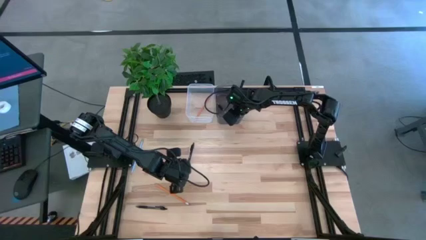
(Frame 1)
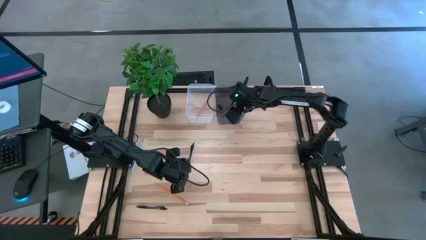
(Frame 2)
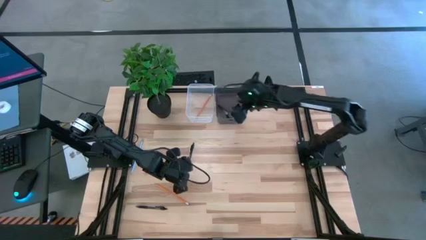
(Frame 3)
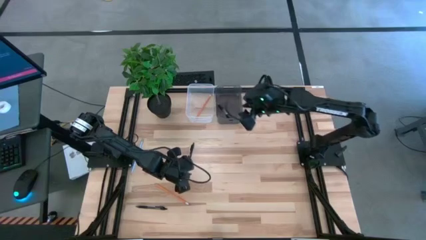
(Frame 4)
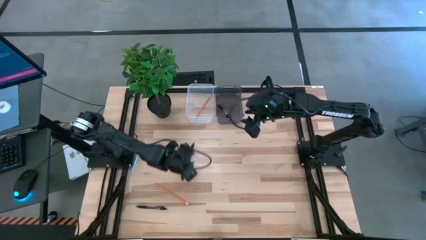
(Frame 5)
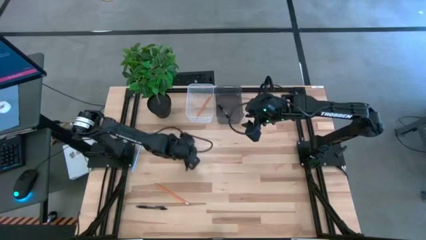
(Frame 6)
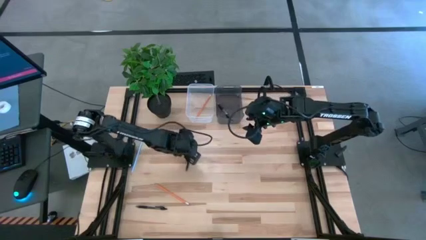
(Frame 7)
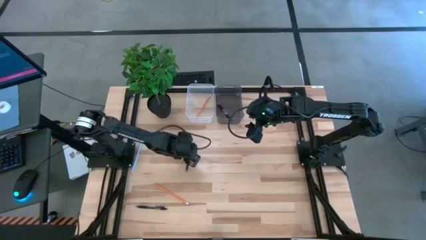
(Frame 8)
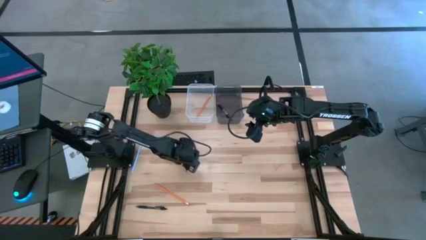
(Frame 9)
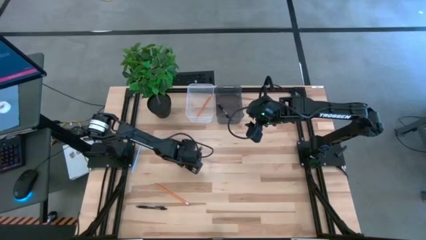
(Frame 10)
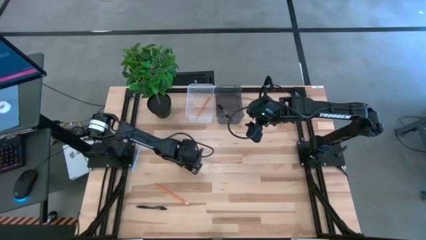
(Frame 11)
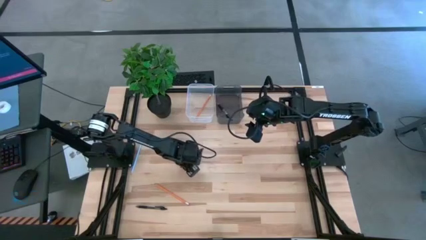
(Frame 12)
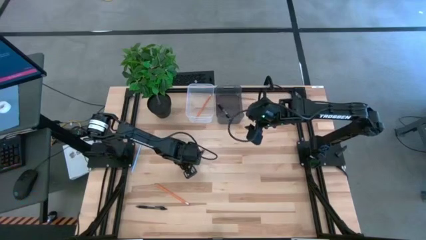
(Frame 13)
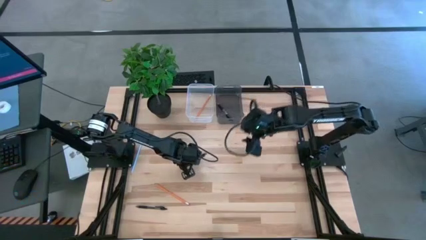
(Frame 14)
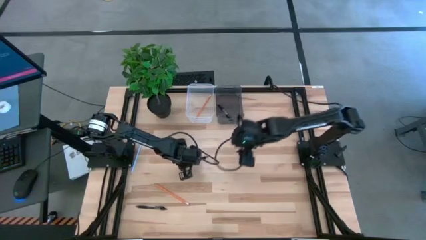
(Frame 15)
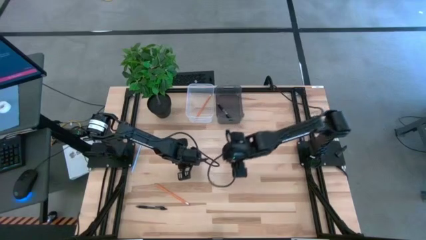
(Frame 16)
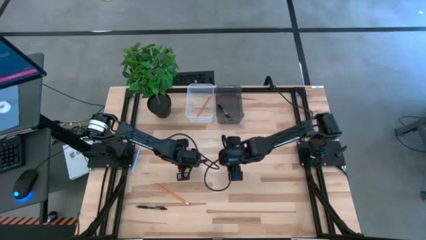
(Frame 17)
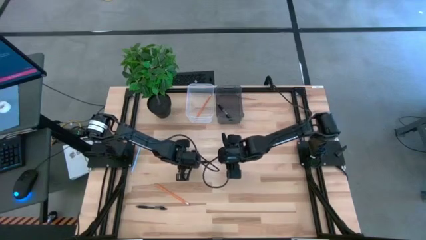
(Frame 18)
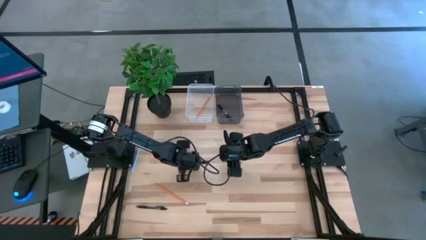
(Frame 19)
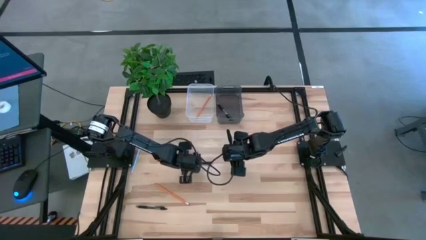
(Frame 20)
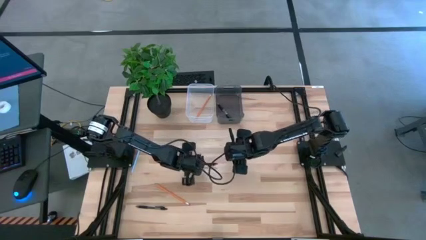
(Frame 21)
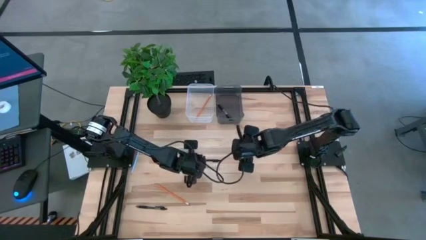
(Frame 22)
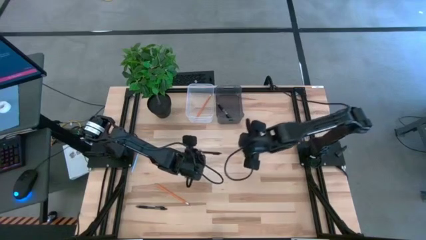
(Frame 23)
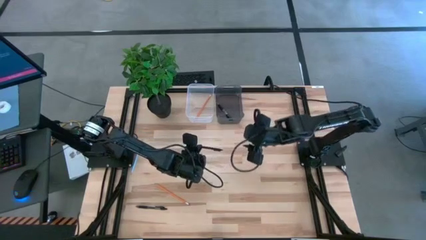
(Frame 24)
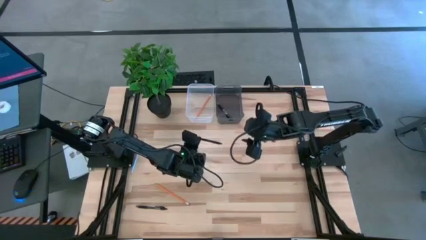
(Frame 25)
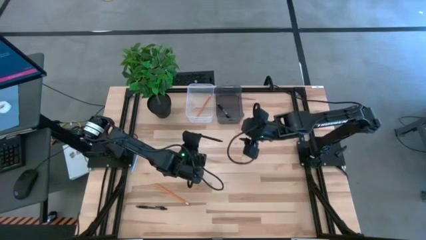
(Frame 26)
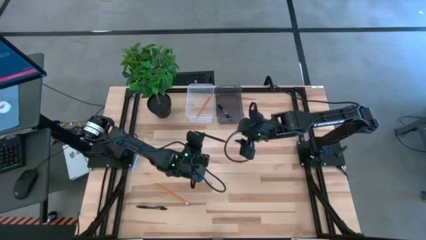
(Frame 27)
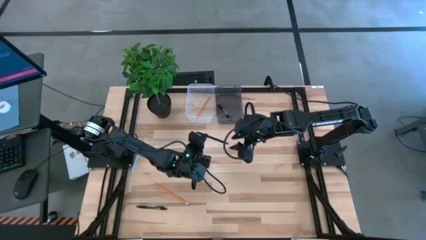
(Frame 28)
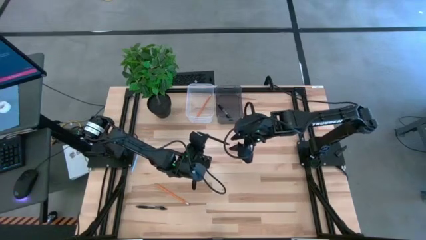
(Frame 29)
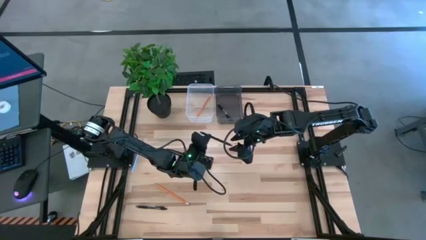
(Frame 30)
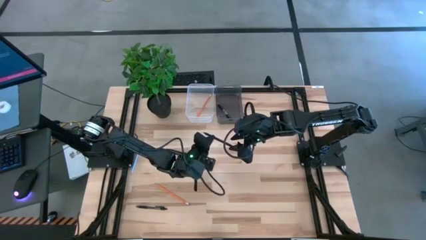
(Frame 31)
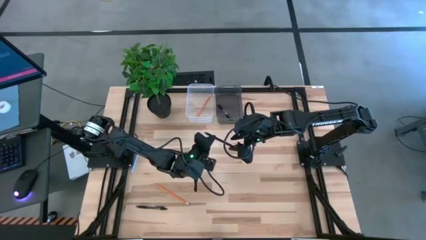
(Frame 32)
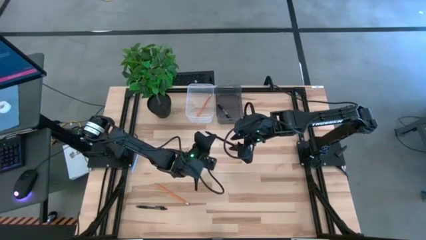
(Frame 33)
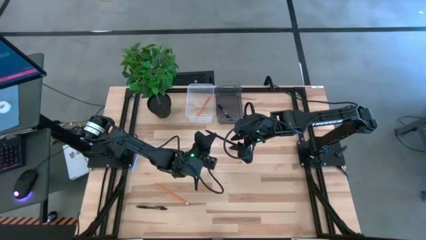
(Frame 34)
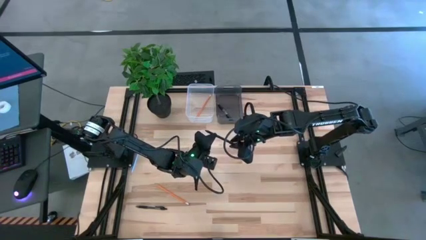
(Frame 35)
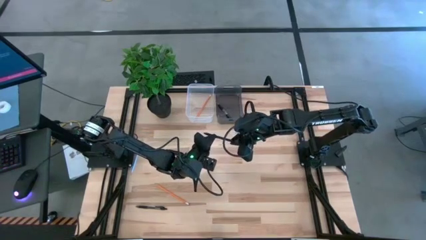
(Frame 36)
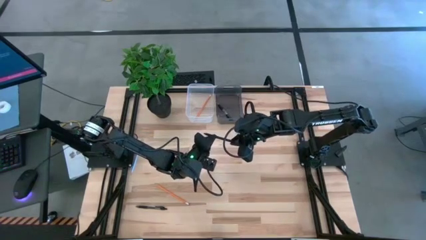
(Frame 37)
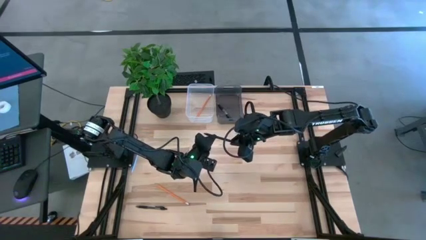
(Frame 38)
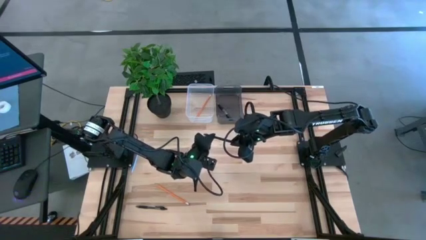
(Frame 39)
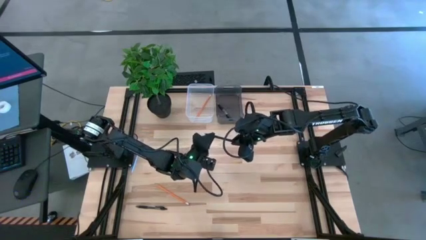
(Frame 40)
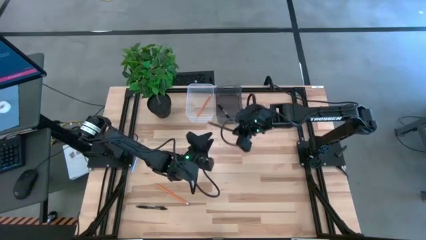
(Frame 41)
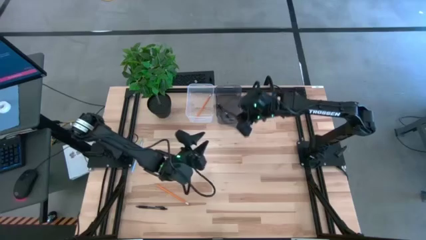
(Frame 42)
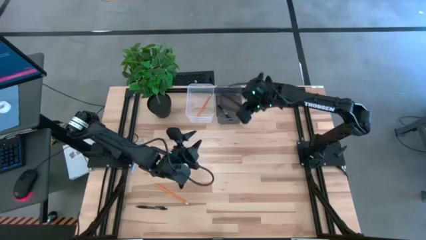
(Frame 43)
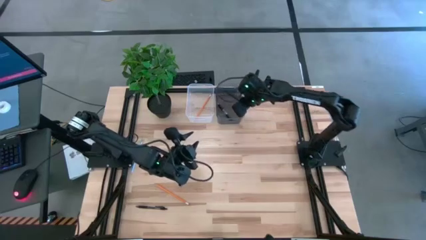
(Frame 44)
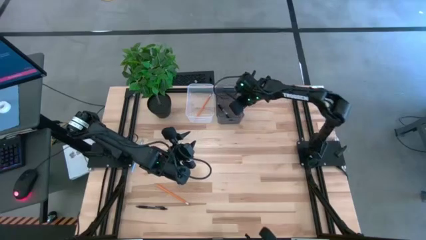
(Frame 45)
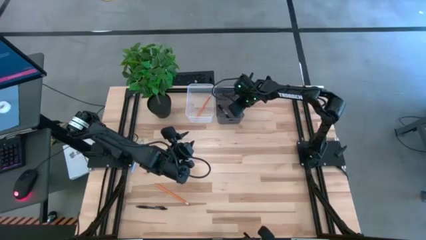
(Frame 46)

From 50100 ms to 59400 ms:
Task: Sort pens & pencils
Put the top black pen into the black bin

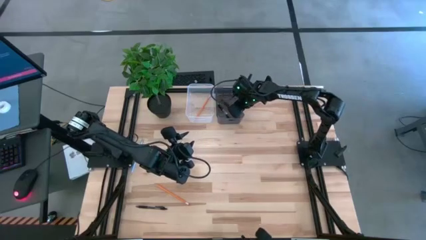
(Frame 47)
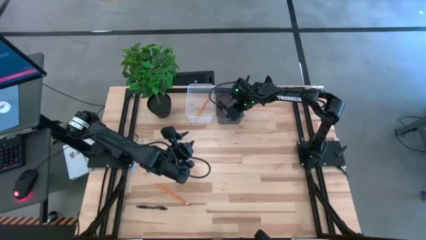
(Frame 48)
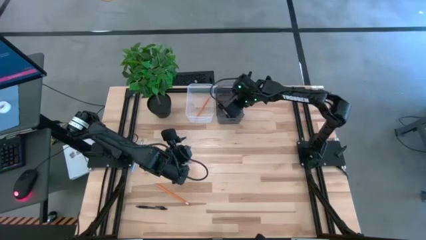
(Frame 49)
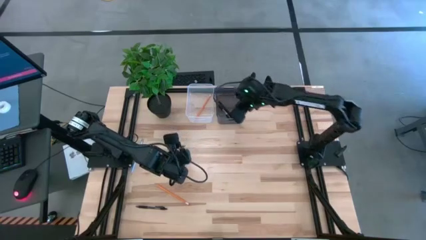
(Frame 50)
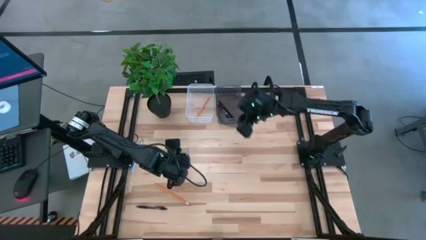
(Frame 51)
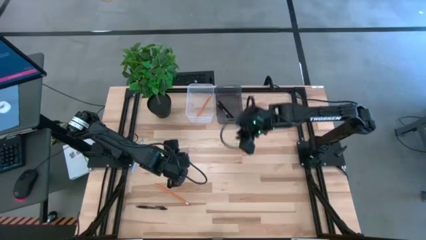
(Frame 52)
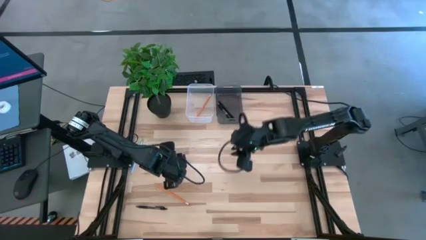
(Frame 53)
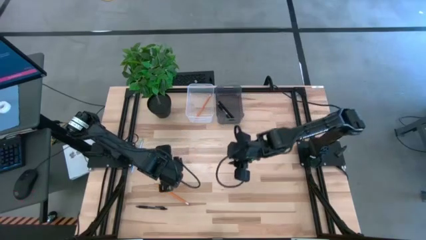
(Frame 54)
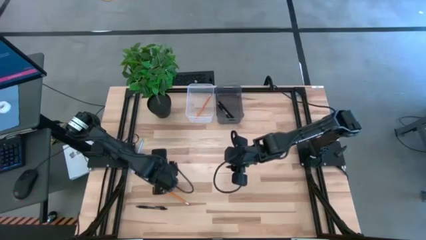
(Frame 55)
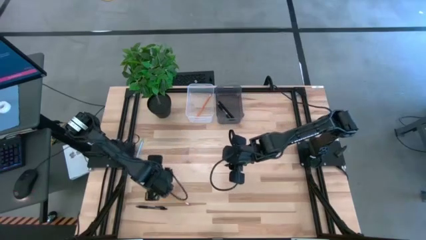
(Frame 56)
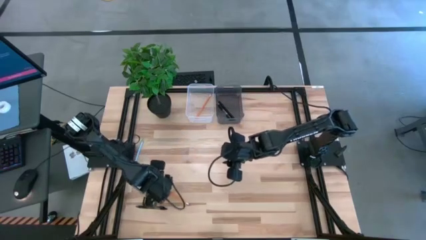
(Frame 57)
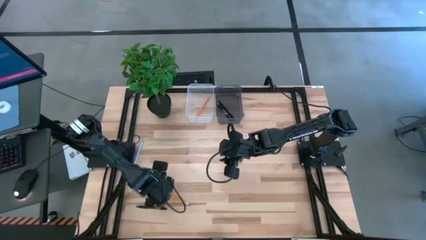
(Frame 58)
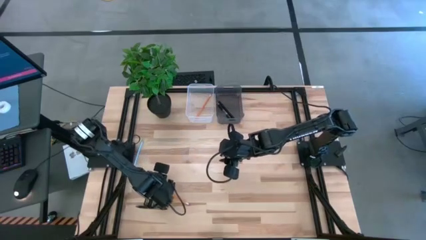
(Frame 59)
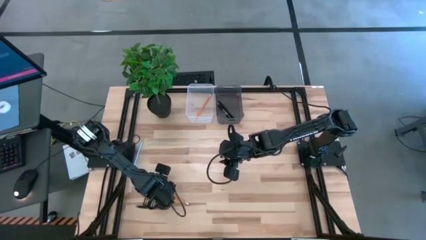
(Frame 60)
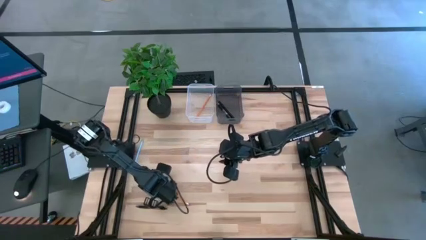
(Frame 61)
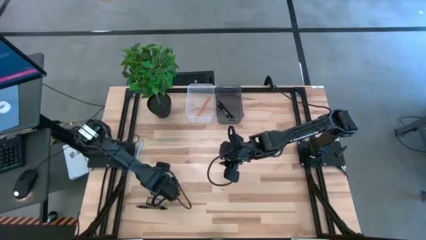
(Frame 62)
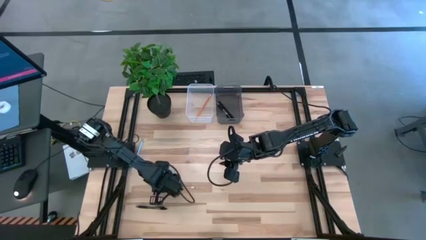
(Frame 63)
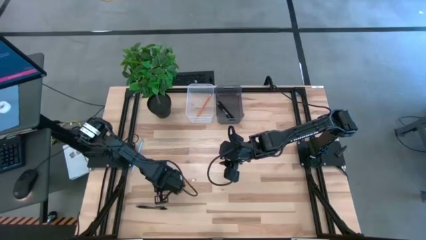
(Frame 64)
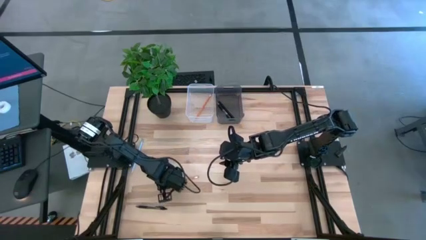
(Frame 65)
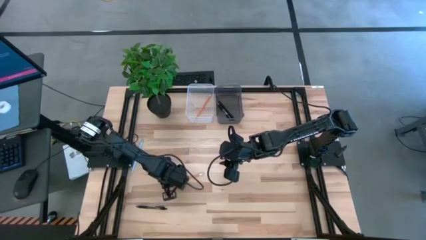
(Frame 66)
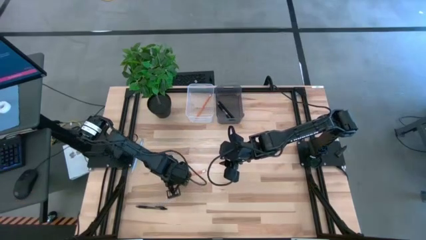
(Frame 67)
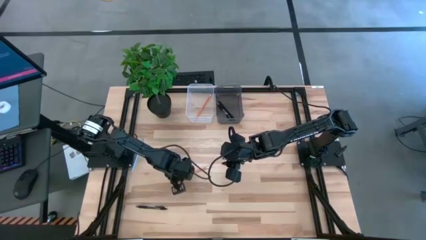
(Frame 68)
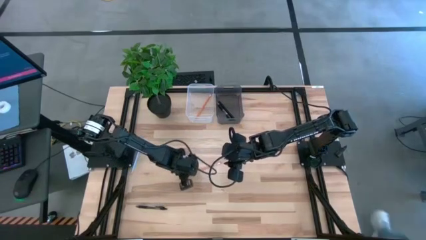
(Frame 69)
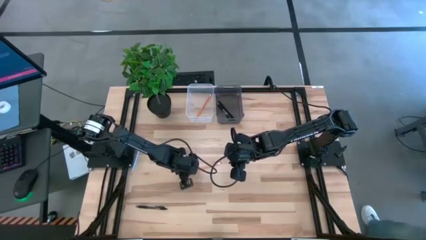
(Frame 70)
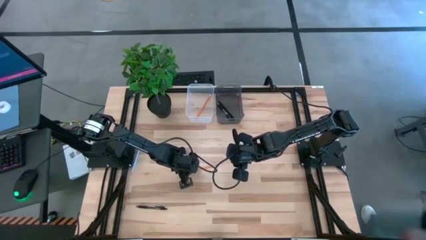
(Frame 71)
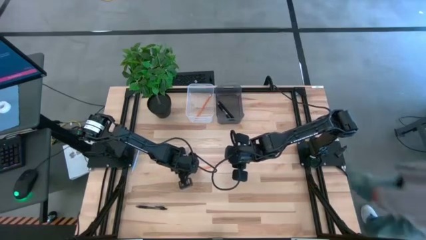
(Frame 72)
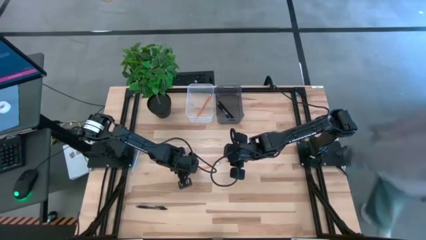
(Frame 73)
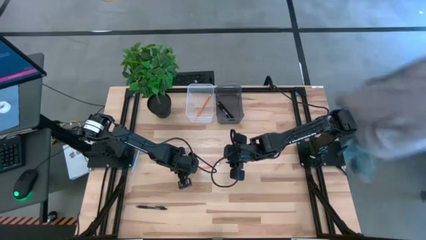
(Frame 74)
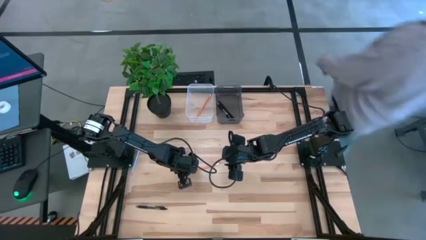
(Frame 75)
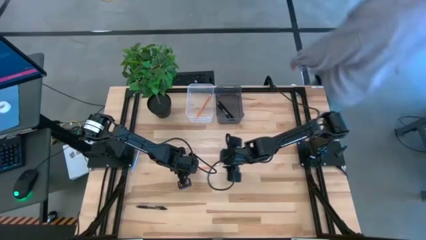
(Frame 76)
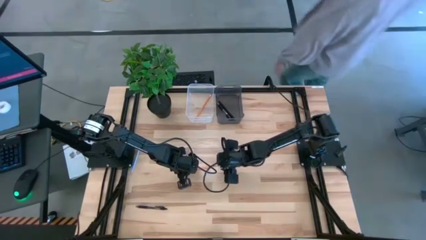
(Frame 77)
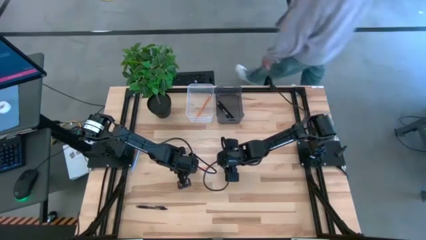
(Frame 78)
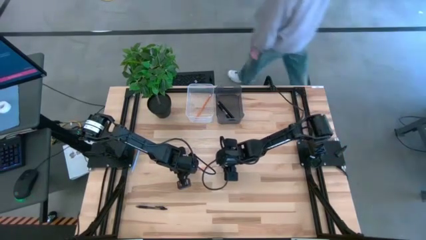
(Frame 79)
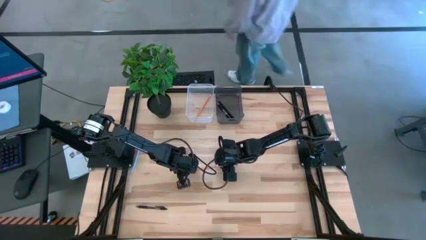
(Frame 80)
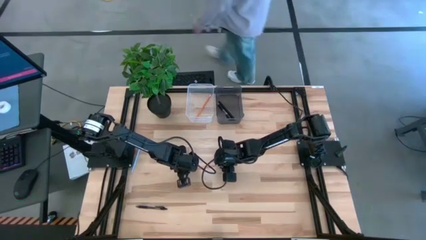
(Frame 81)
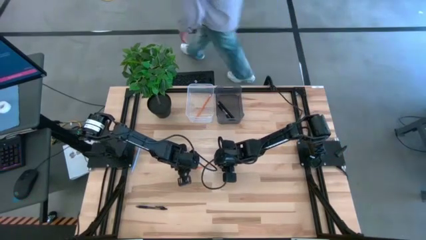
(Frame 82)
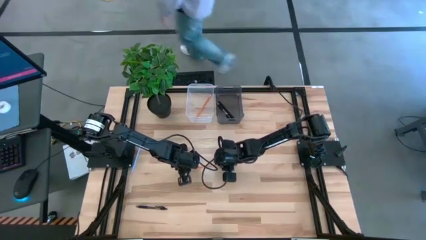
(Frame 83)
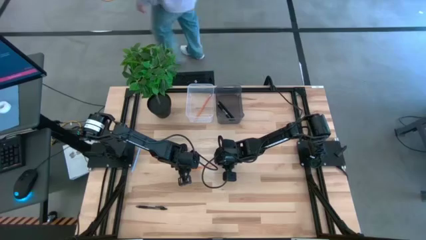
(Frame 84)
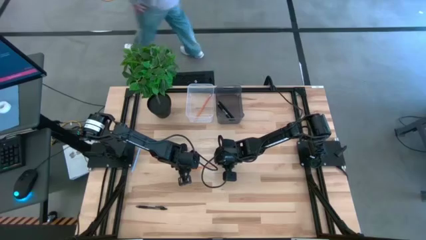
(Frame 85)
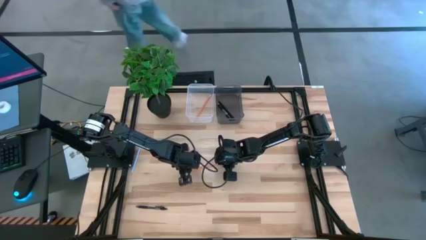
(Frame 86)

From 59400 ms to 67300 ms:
Put the orange pencil into the transparent bin
